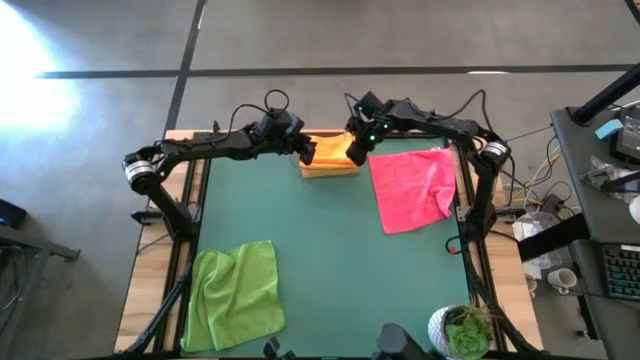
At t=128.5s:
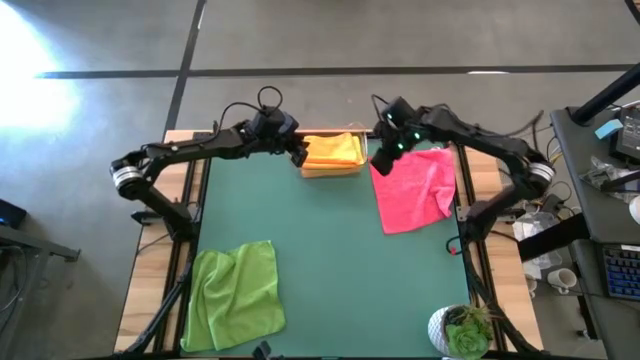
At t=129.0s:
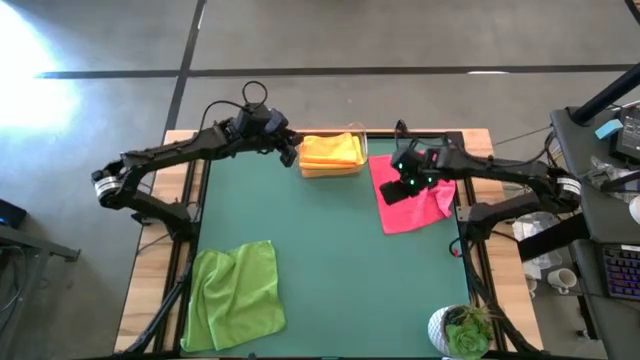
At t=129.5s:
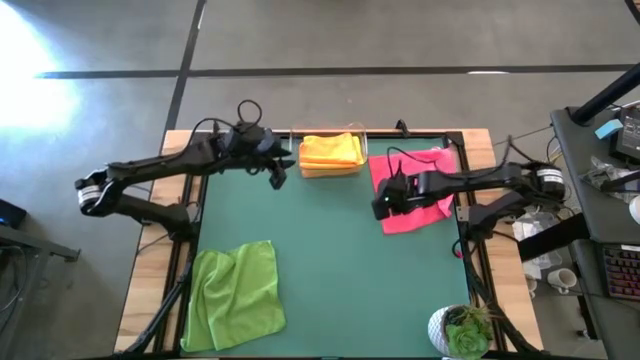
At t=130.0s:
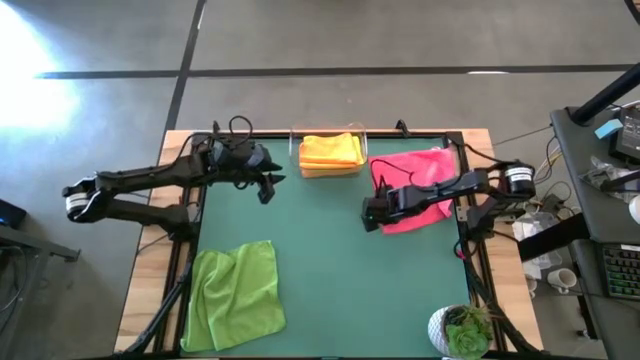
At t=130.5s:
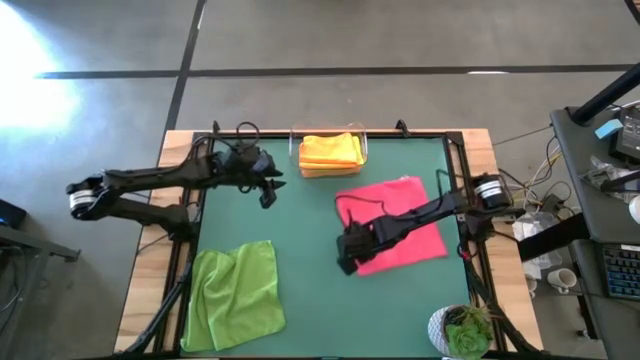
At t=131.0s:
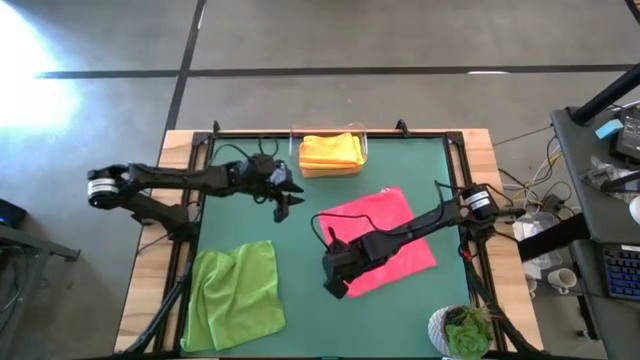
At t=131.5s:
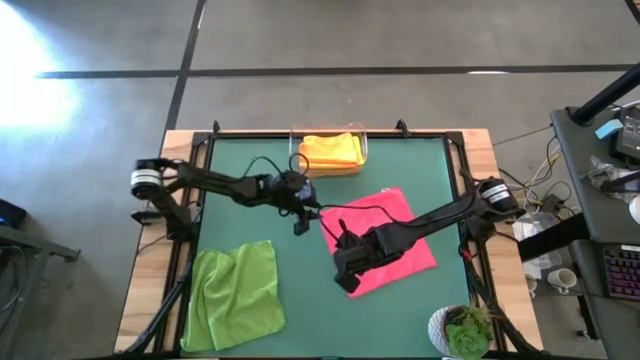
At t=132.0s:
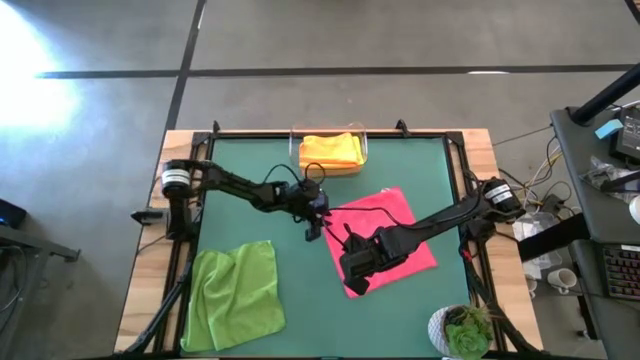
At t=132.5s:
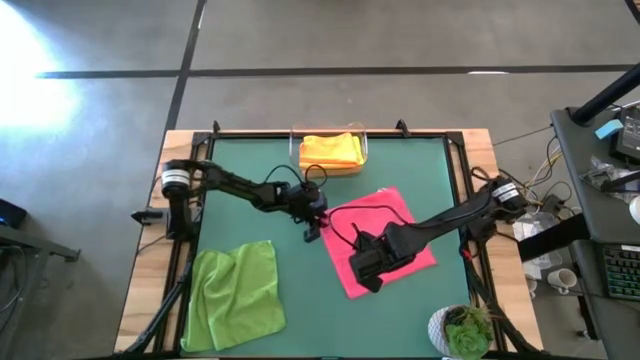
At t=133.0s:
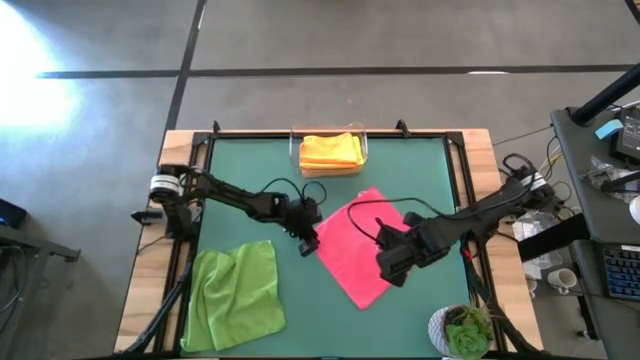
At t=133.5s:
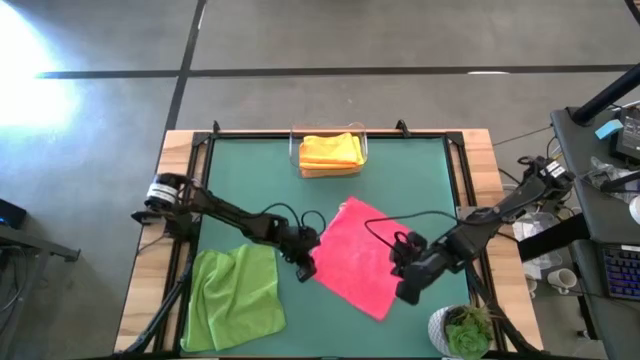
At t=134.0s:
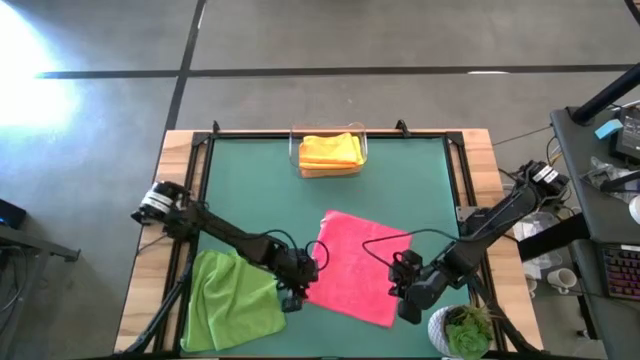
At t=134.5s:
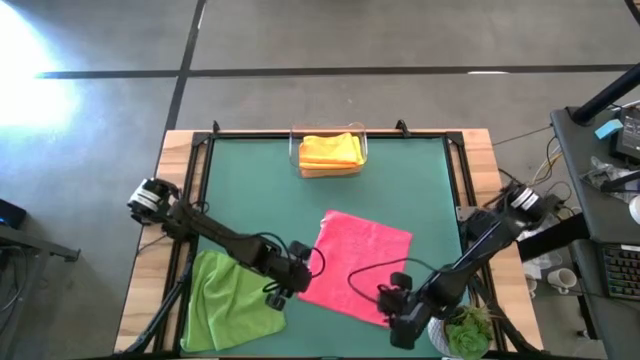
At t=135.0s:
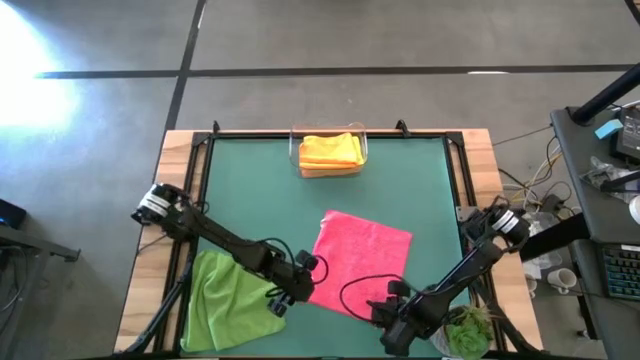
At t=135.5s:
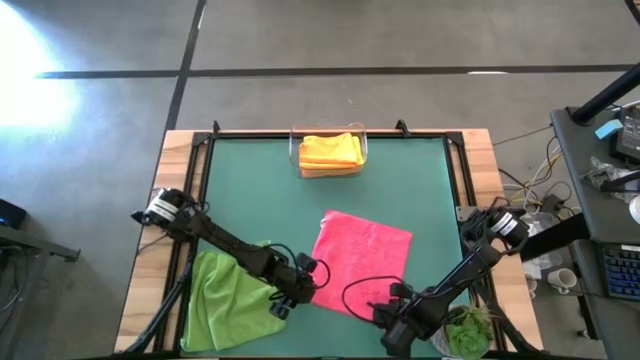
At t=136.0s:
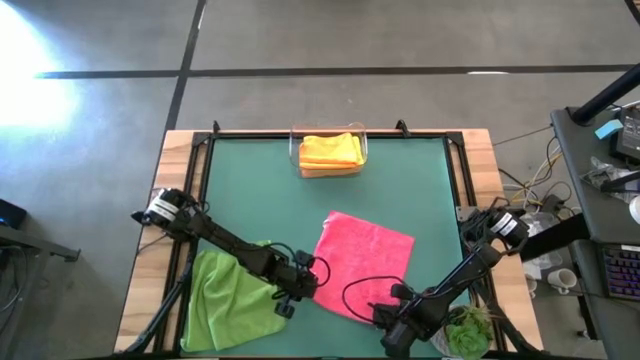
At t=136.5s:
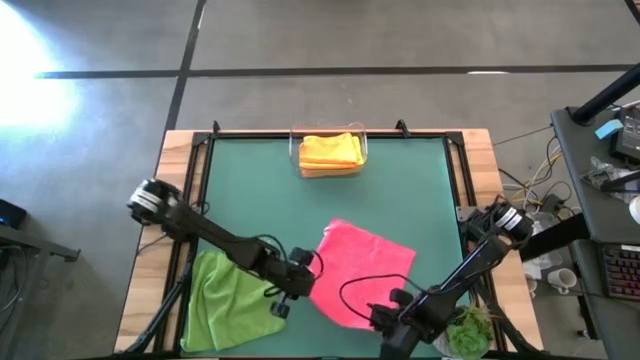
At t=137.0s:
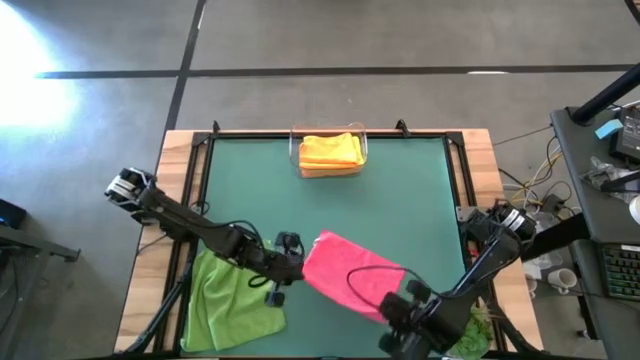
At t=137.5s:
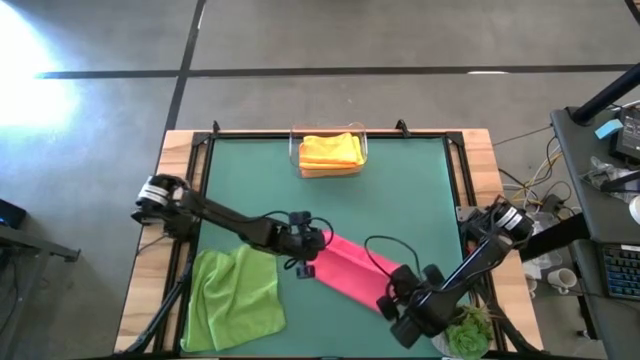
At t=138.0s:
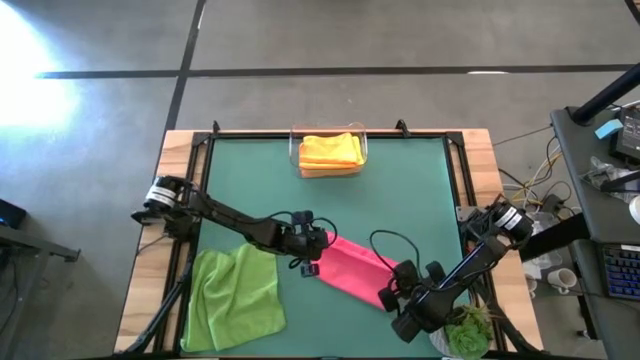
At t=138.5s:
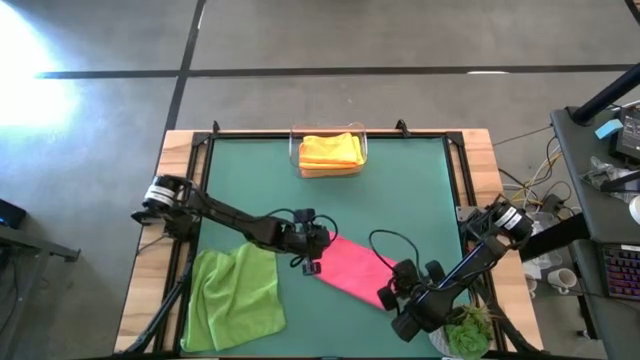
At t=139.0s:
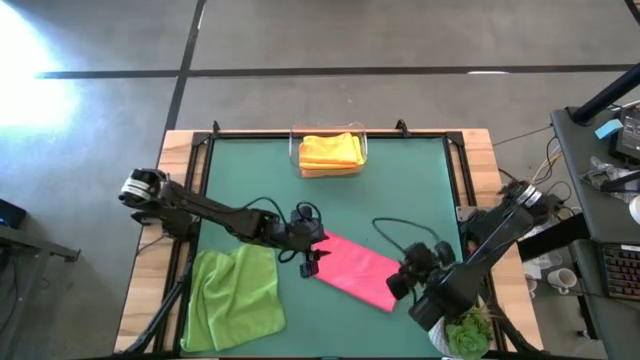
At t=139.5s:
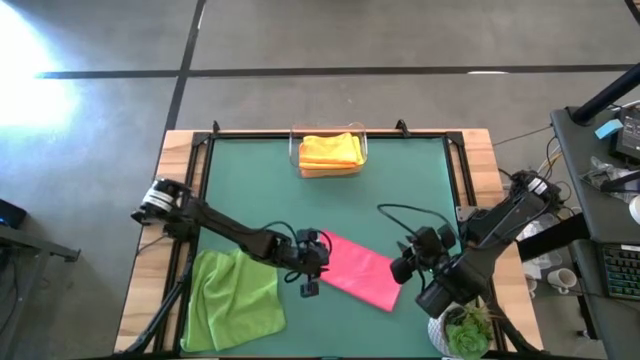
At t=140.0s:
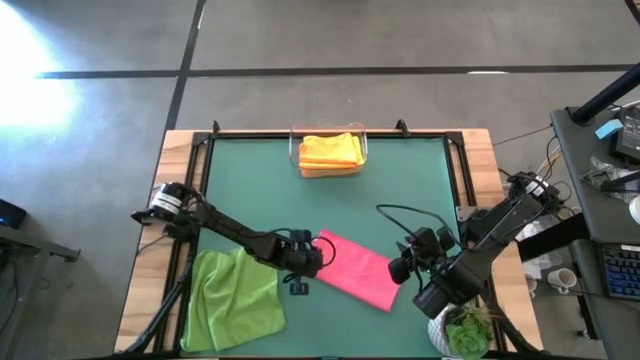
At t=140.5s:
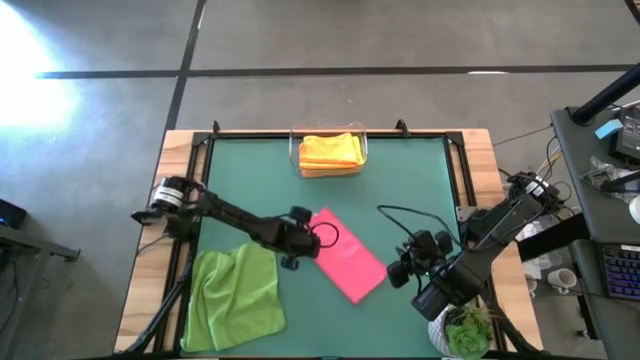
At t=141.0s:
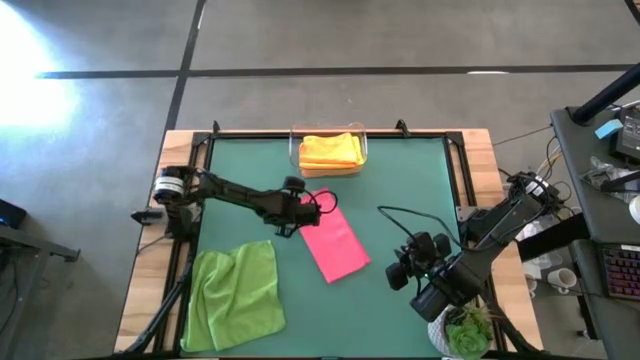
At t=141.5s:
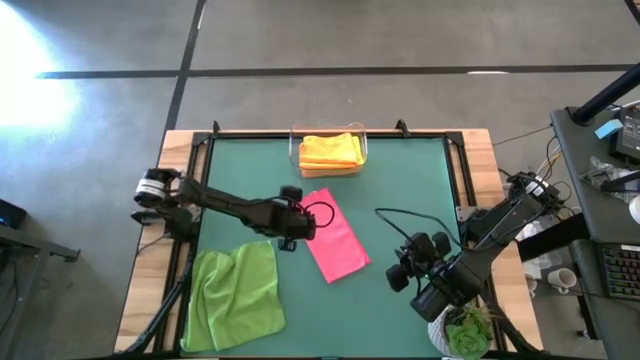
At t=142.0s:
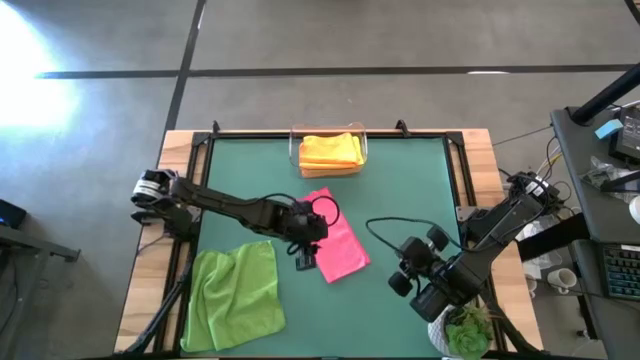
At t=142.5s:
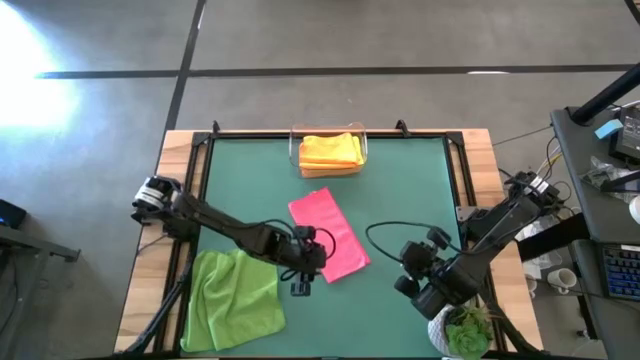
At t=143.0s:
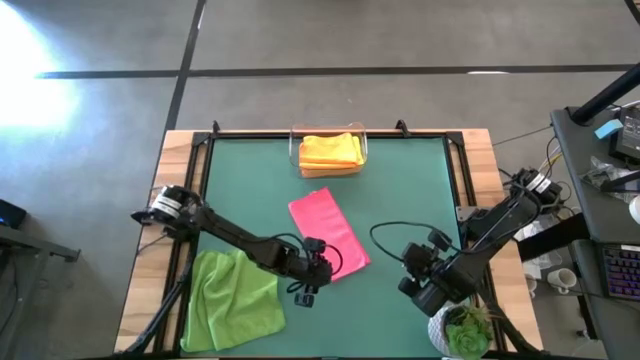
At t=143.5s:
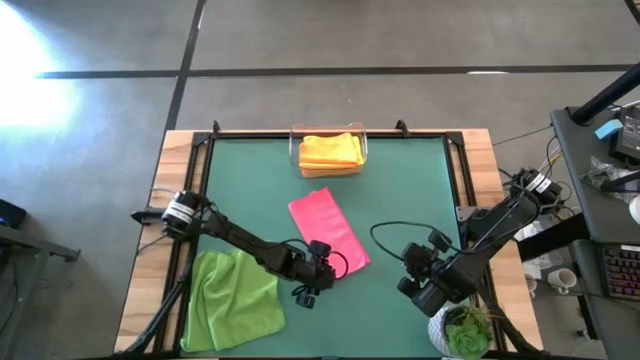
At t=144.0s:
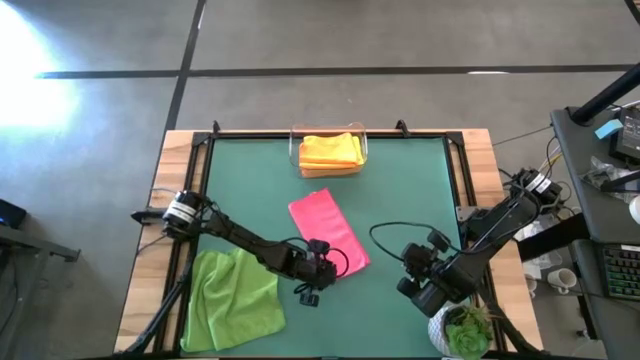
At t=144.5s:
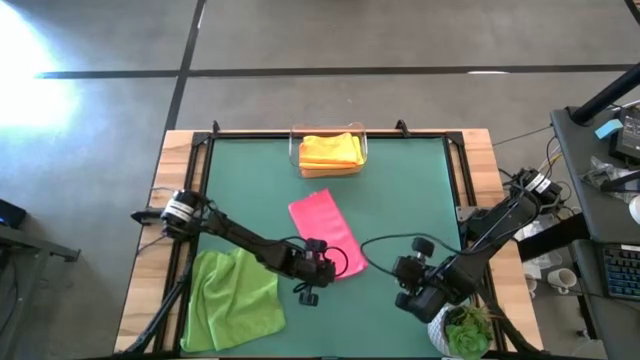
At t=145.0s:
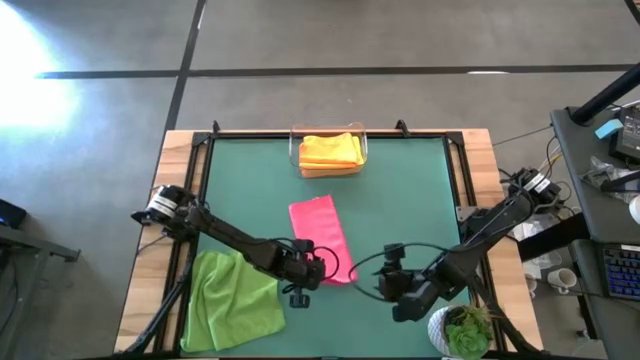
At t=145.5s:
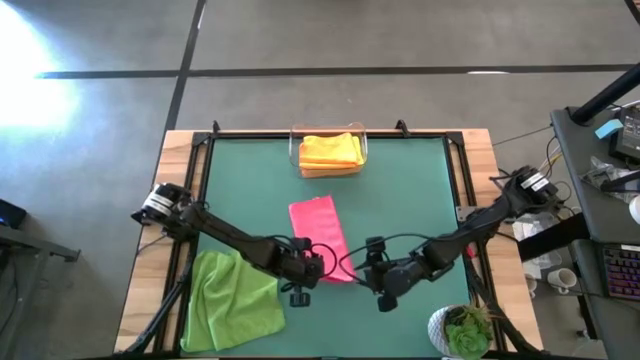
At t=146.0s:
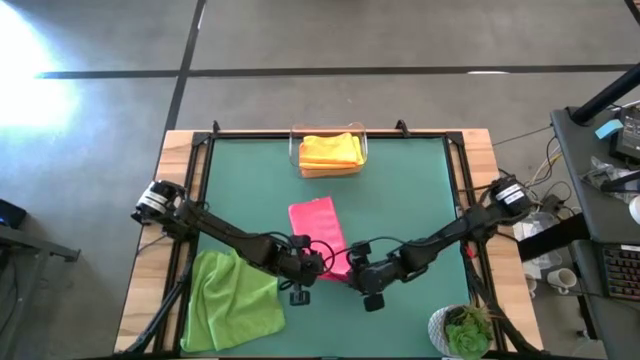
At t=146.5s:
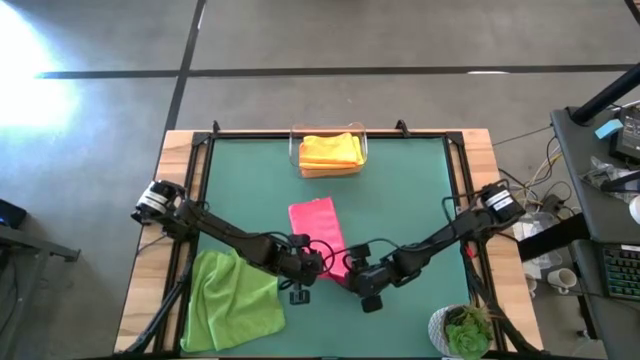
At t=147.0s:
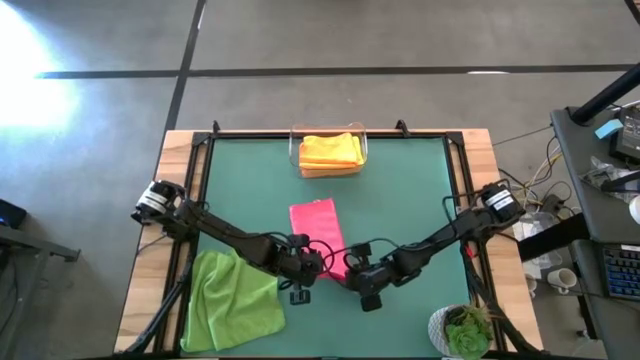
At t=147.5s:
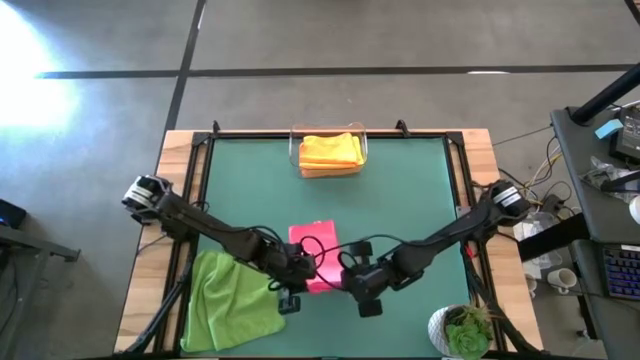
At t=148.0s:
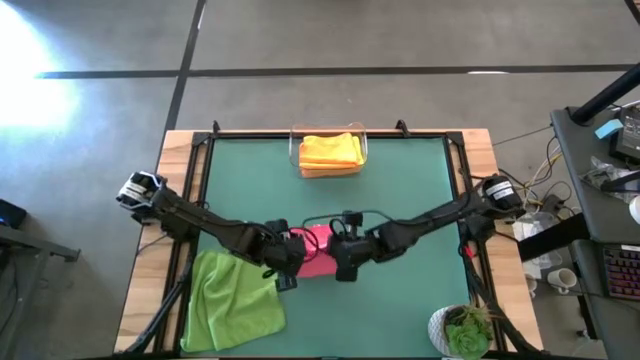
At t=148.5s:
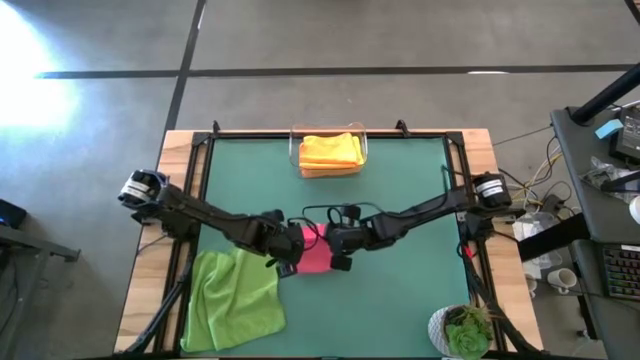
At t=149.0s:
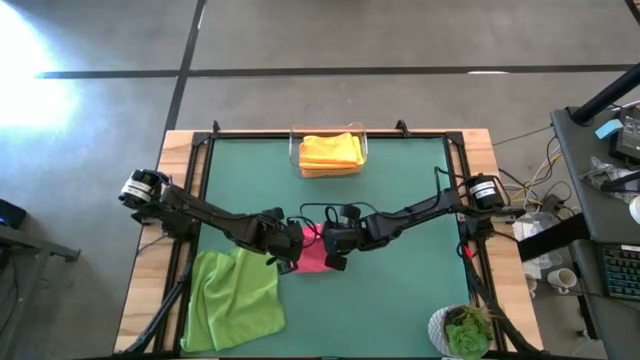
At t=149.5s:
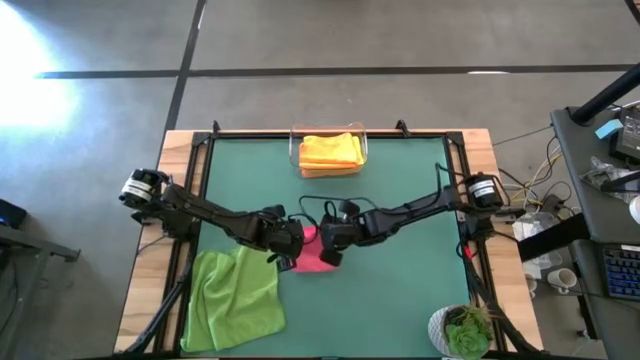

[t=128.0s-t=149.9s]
Task: Fold microfiber towels
Fold the pink microfiber towel
